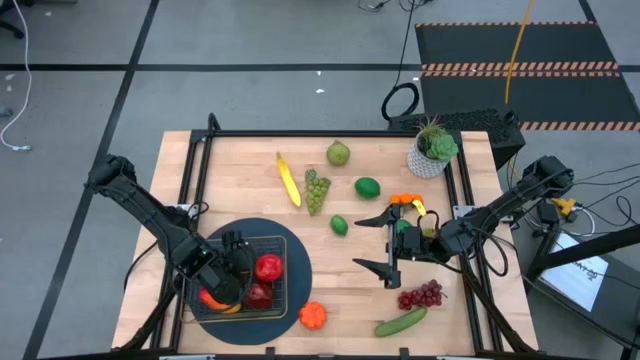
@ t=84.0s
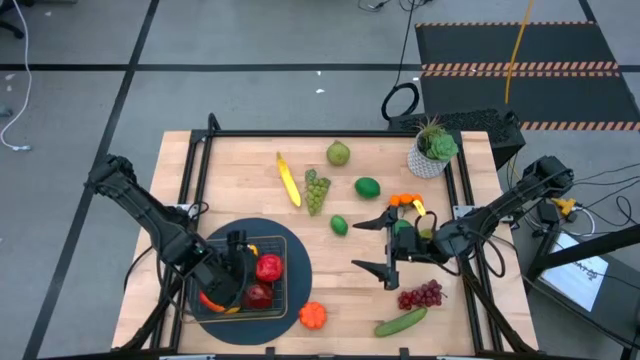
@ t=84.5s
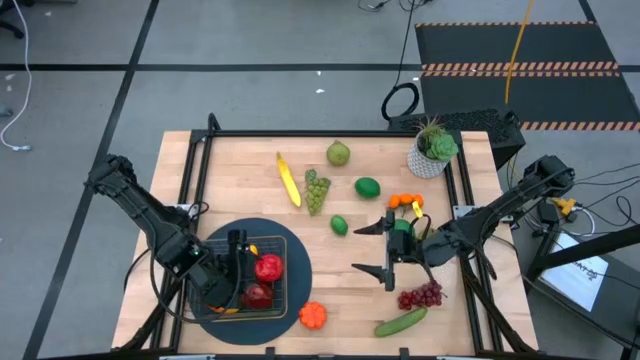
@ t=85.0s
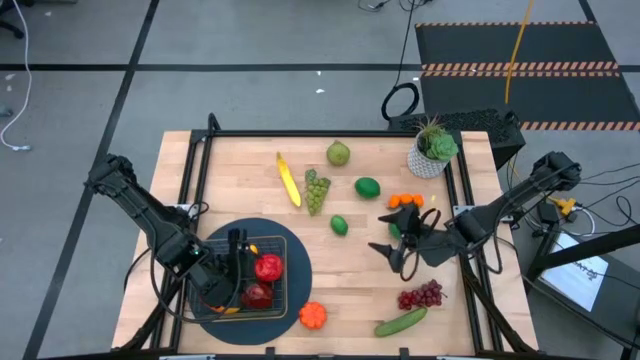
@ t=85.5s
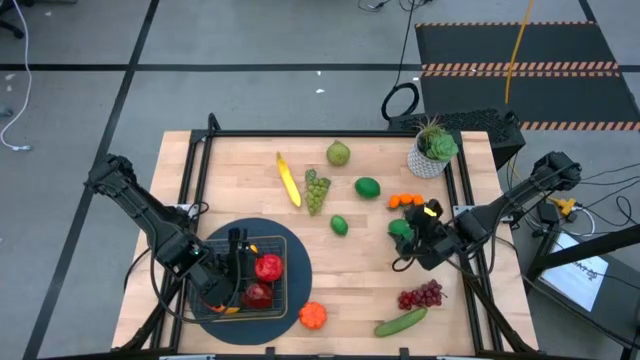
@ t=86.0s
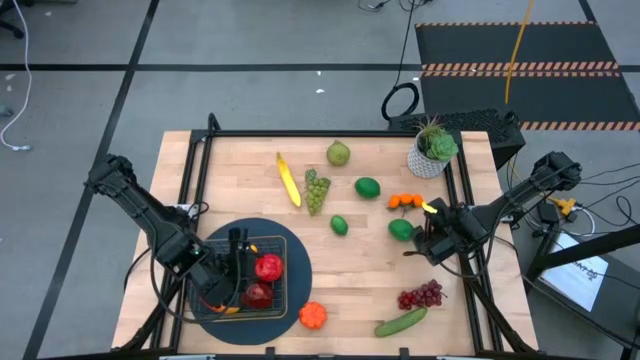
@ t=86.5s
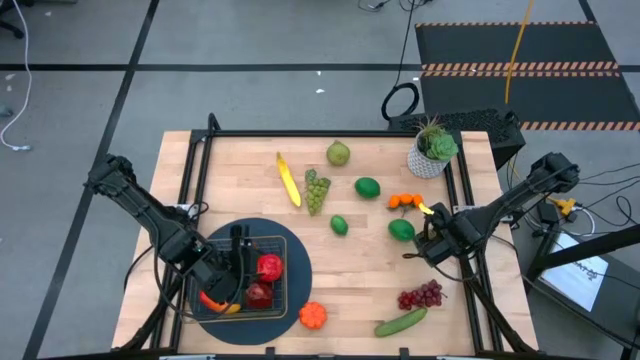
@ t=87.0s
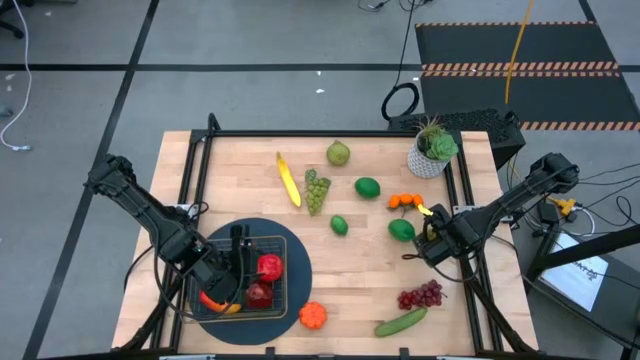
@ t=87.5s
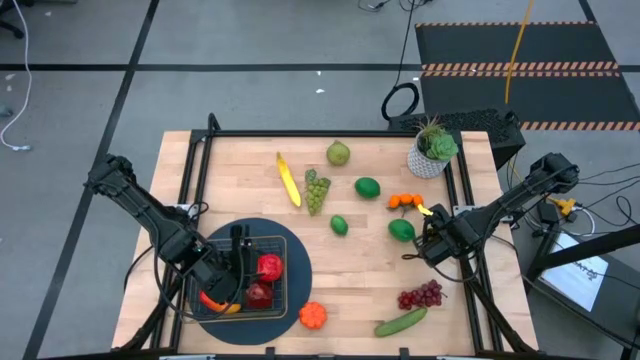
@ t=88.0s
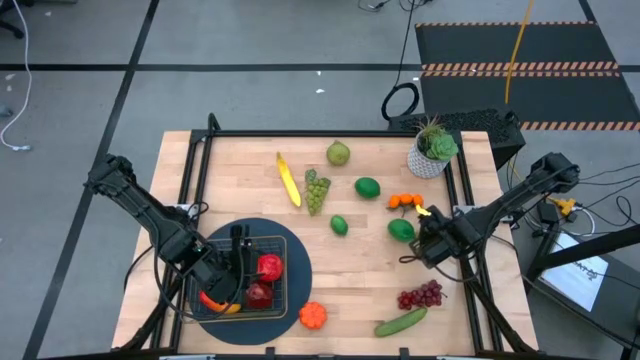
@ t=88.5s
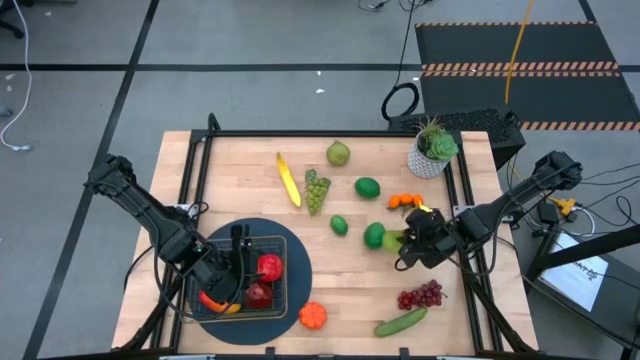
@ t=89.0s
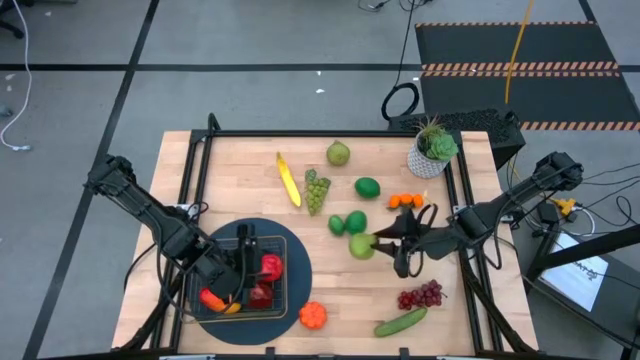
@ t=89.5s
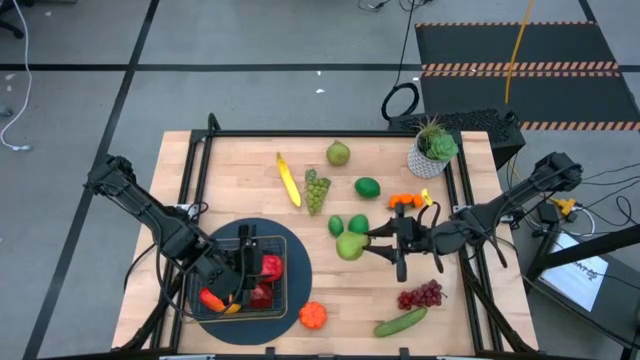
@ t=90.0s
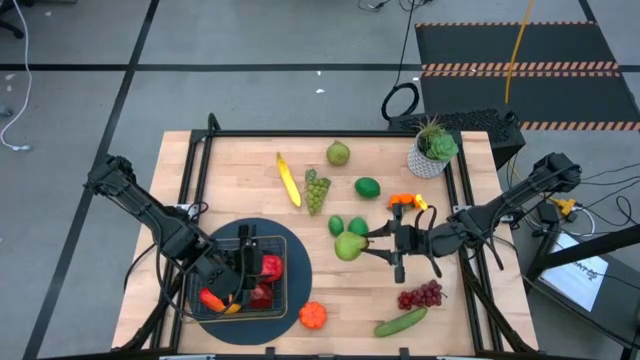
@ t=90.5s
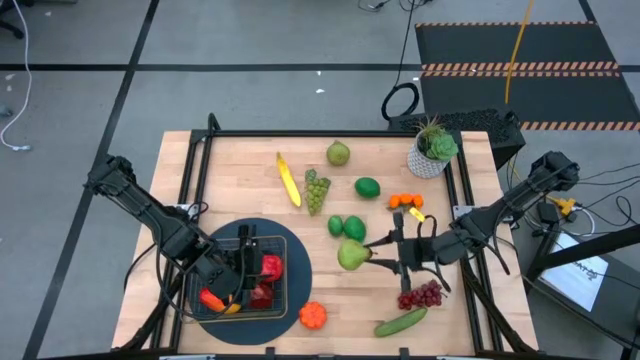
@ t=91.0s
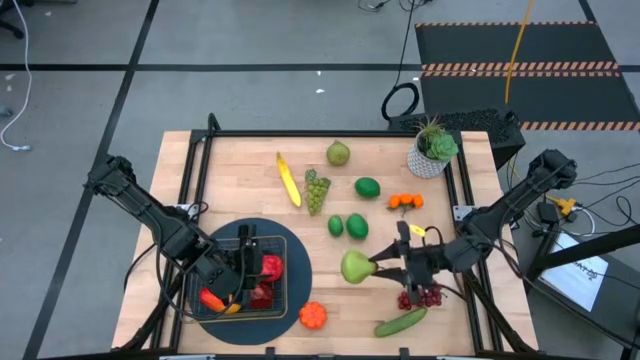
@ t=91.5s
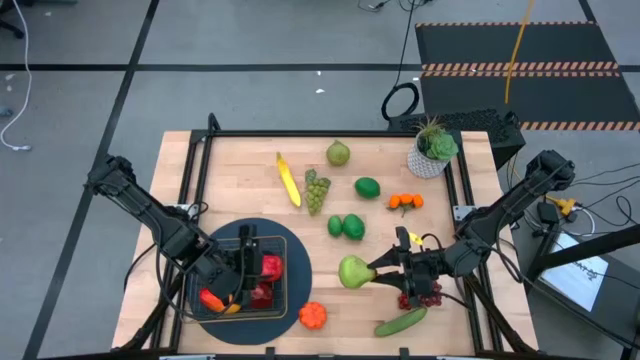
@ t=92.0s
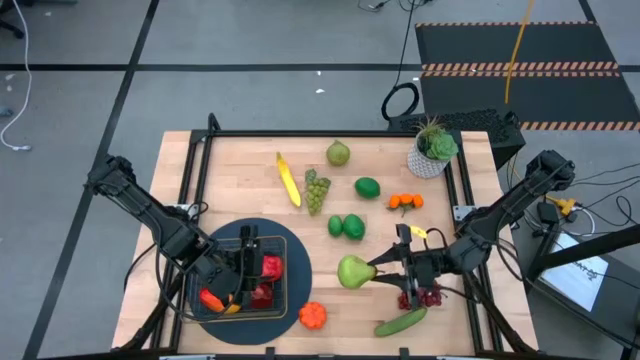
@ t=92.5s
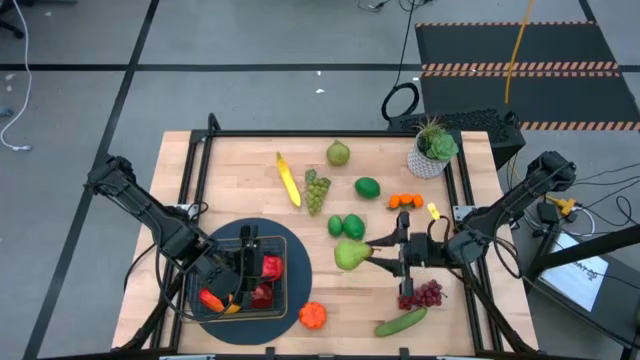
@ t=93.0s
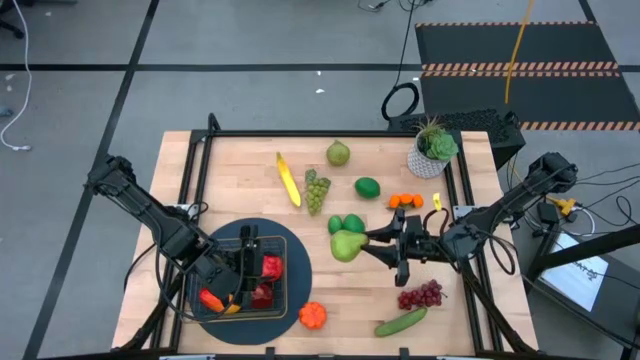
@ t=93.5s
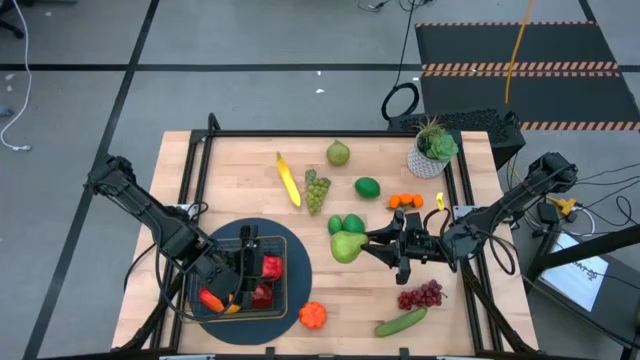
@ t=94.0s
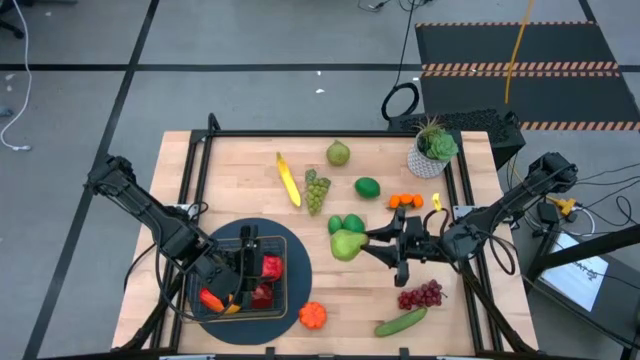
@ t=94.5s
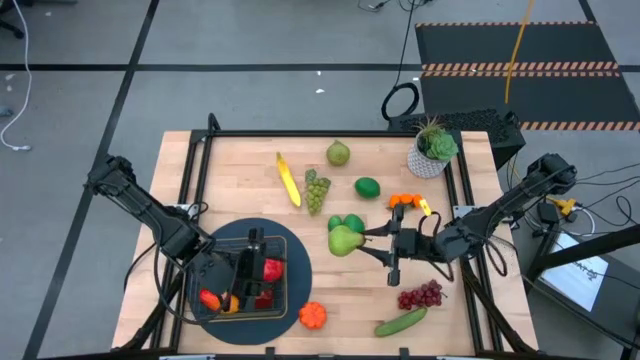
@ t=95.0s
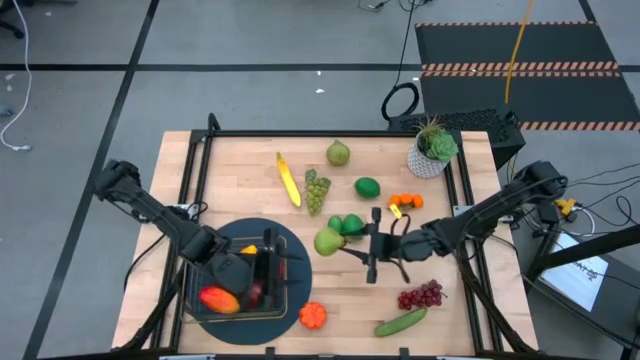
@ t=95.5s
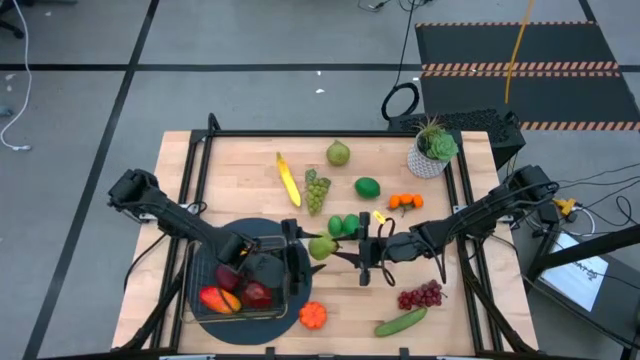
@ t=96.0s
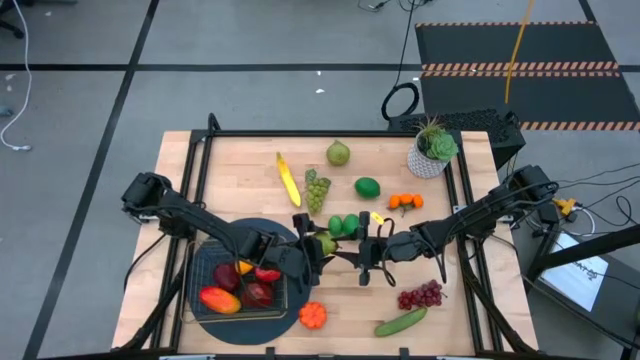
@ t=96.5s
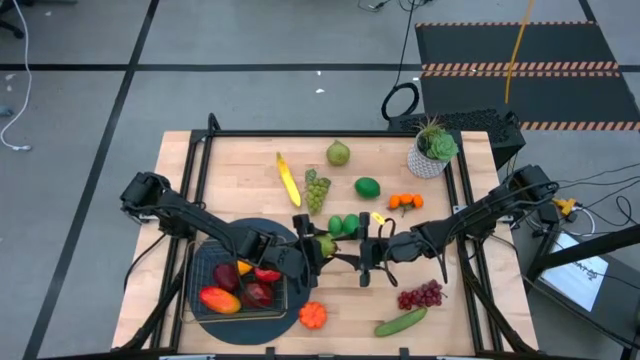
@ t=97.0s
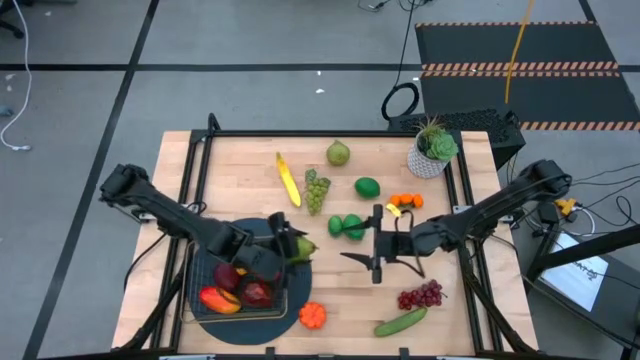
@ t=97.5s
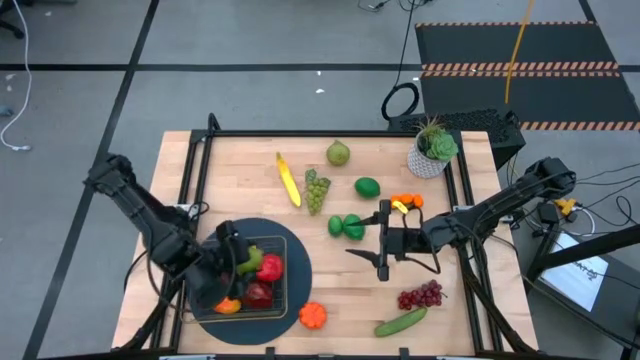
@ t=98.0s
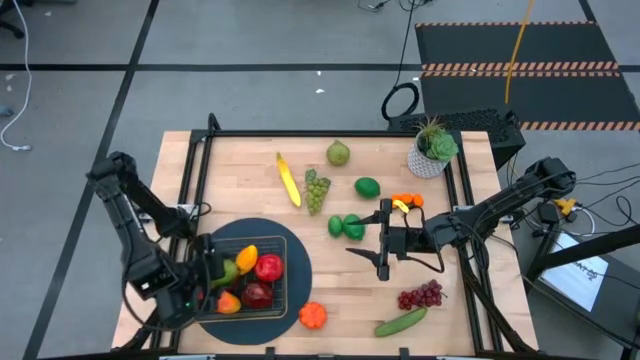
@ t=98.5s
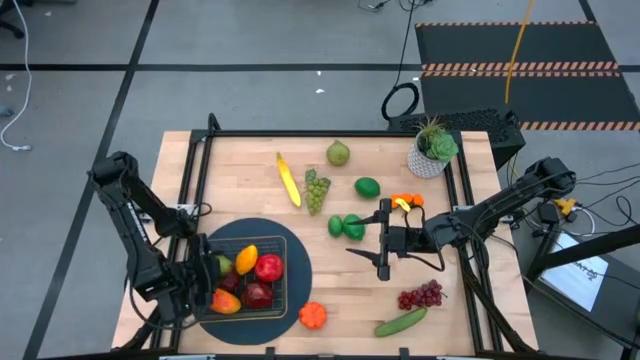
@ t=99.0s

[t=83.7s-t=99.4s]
Task: Build produce basket
Put the bottom pear into the gold wire basket

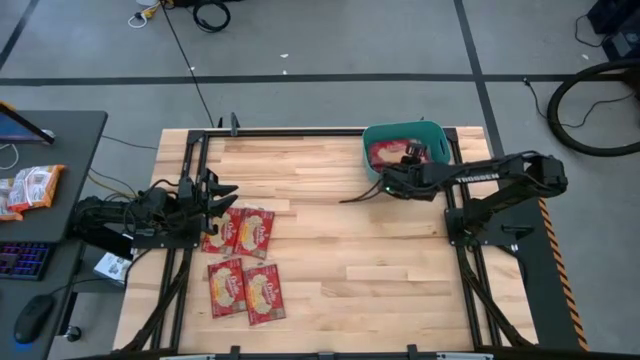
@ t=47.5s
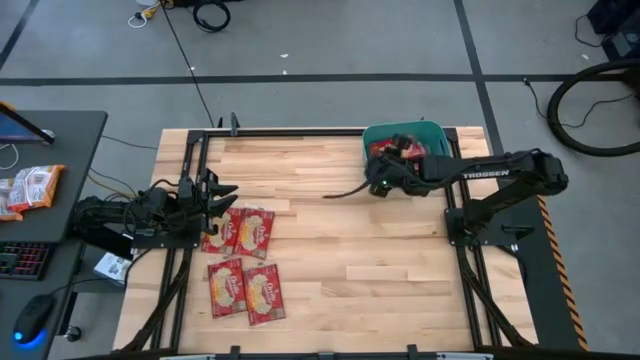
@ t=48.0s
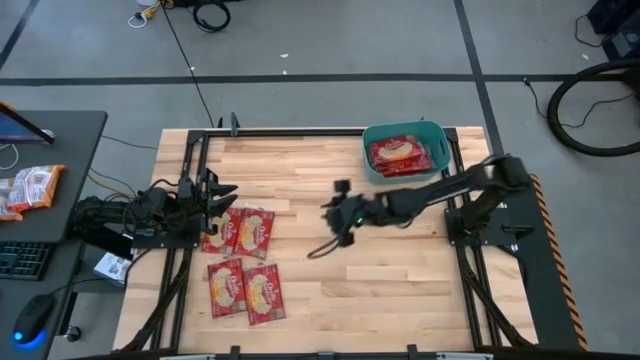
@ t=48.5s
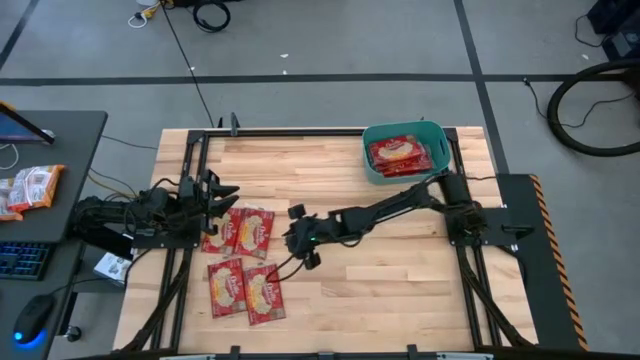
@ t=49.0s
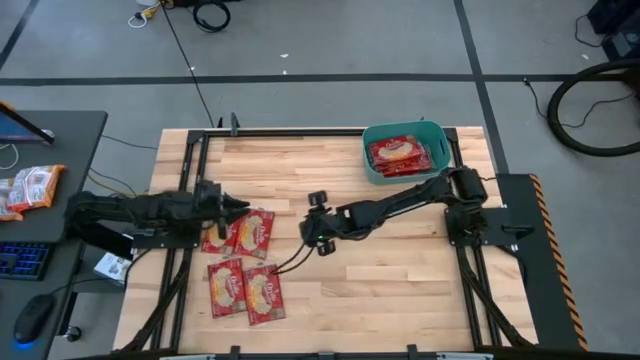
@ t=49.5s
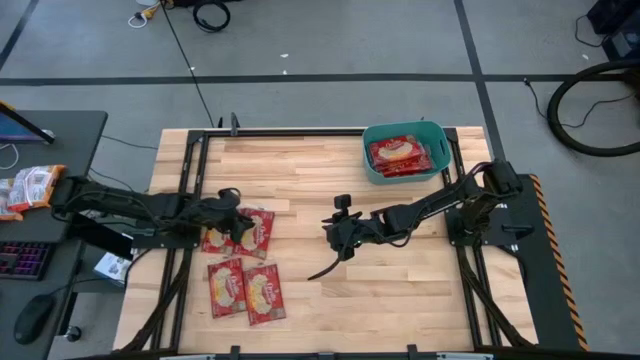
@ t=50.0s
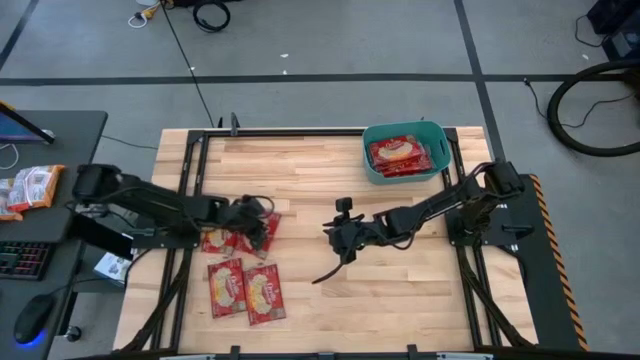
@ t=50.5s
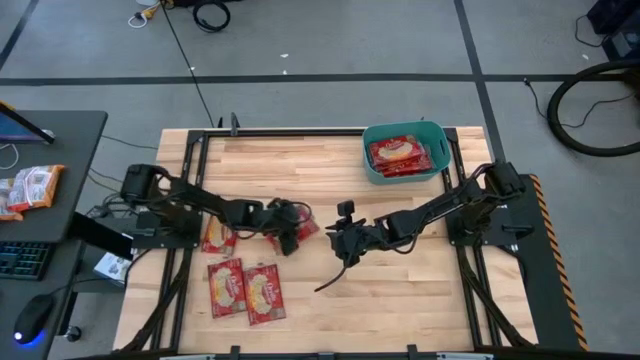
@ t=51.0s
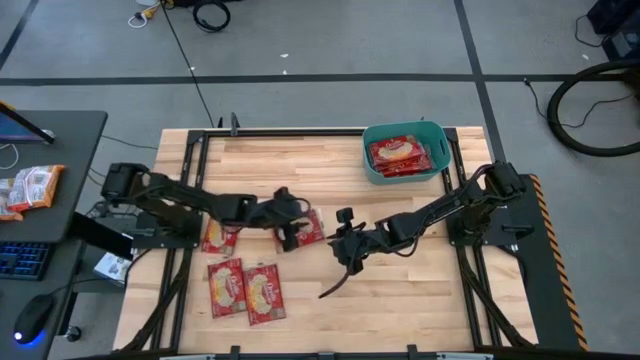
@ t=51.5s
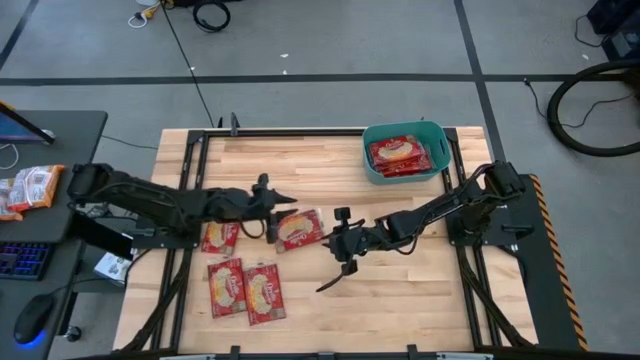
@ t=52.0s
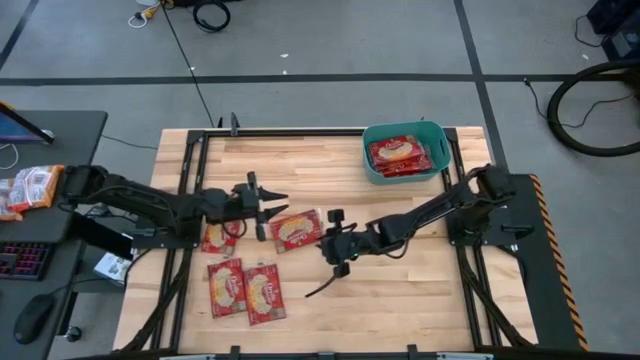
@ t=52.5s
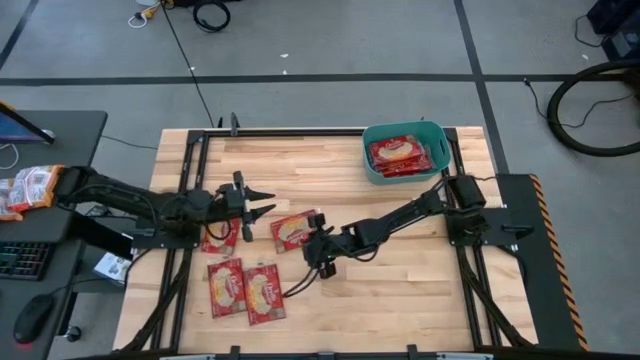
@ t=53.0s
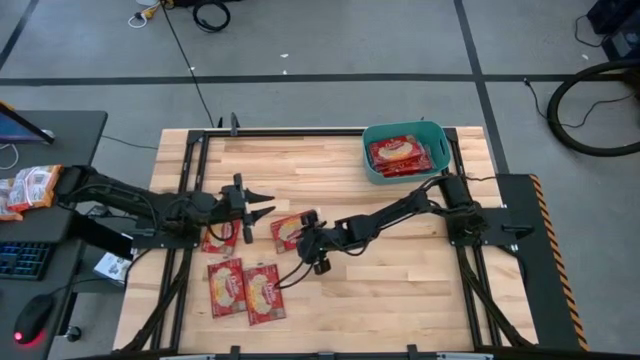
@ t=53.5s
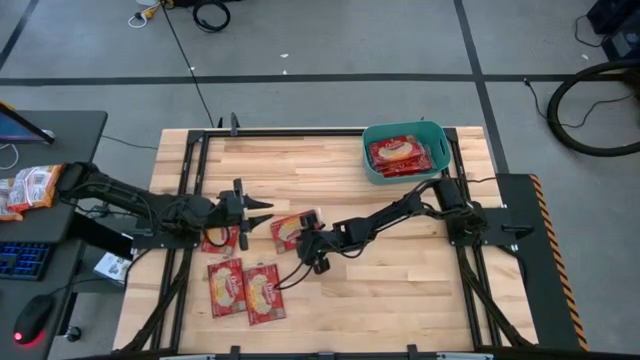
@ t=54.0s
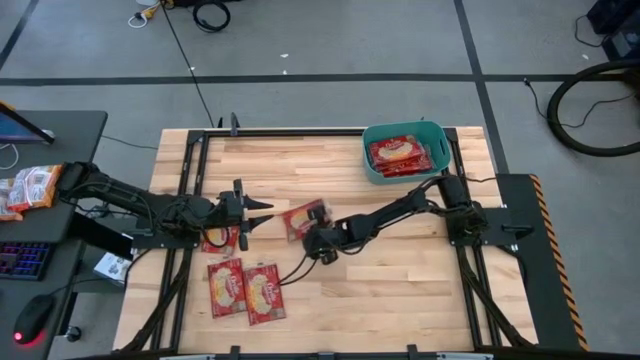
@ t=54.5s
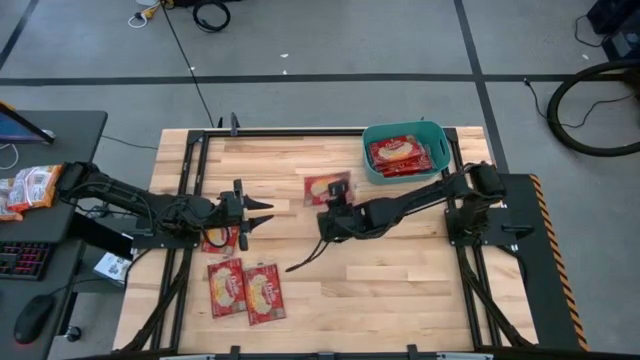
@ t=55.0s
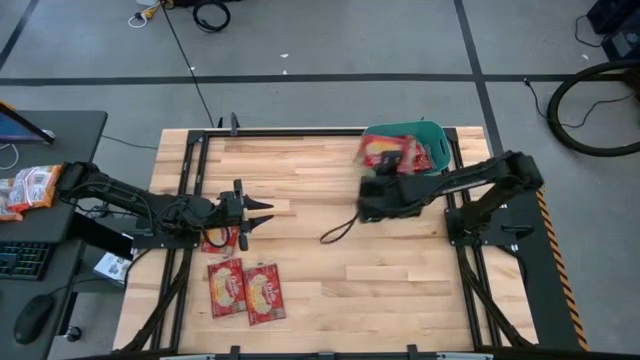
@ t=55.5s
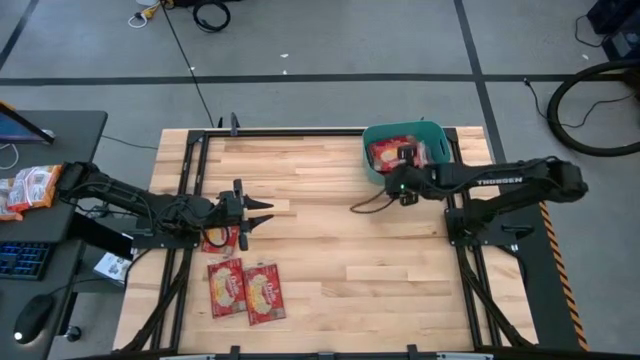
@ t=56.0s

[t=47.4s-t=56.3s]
Task: Sort popcorn bags into baskets
Put the red popcorn bag into the green bin
